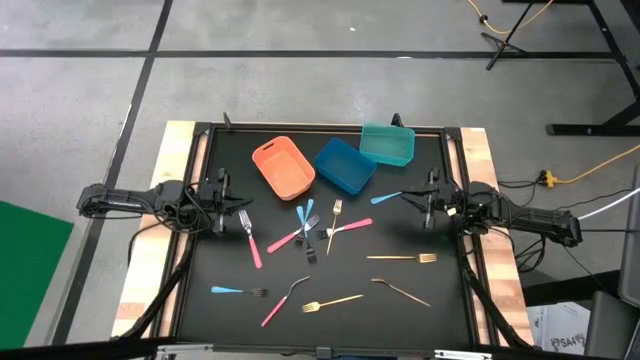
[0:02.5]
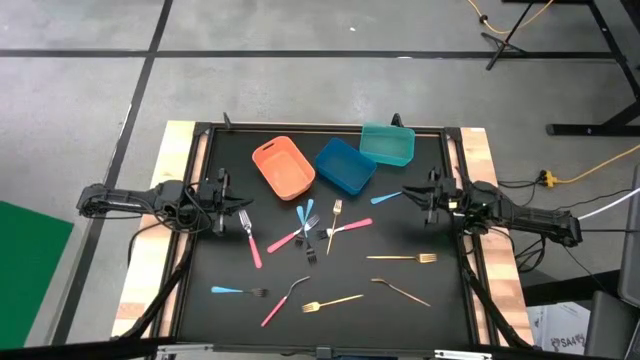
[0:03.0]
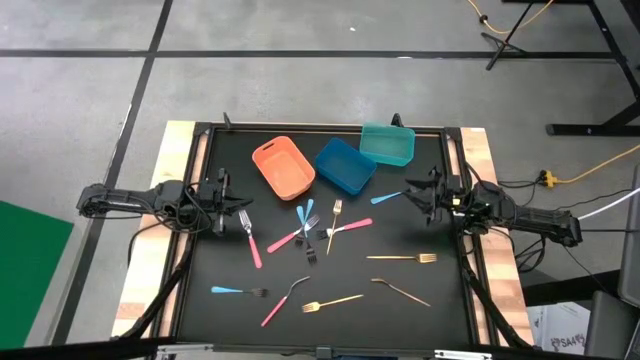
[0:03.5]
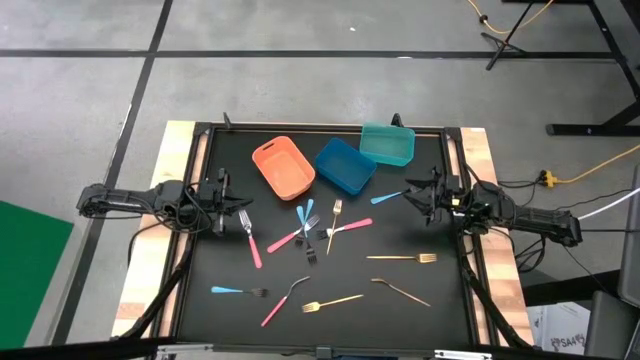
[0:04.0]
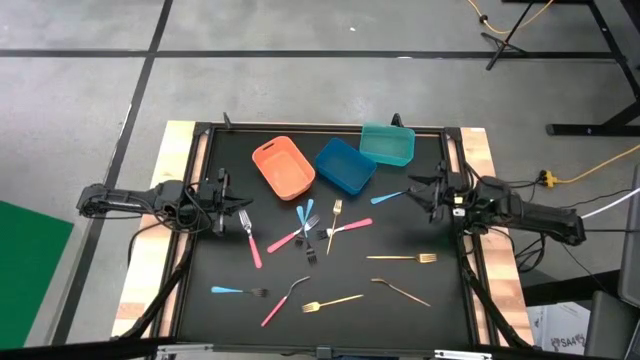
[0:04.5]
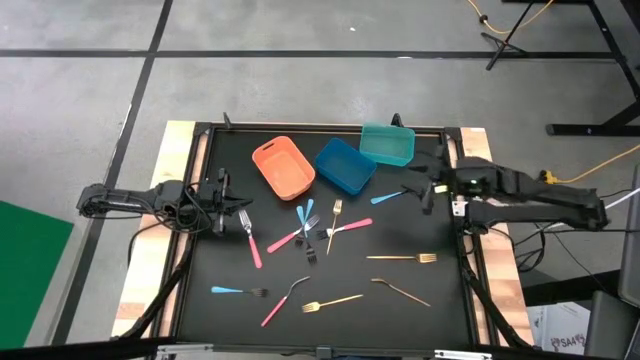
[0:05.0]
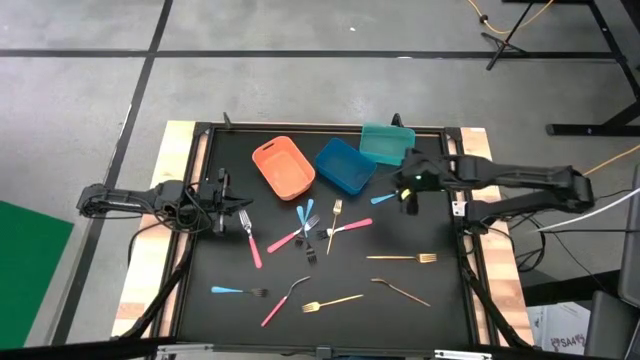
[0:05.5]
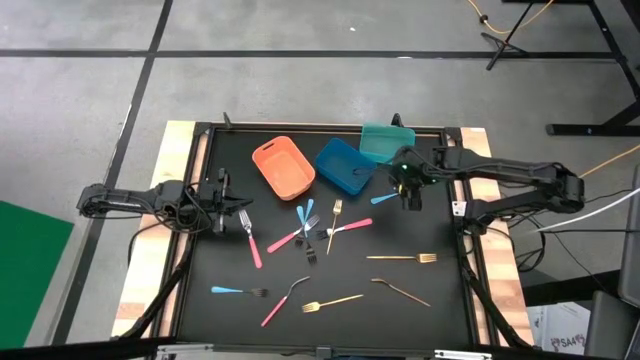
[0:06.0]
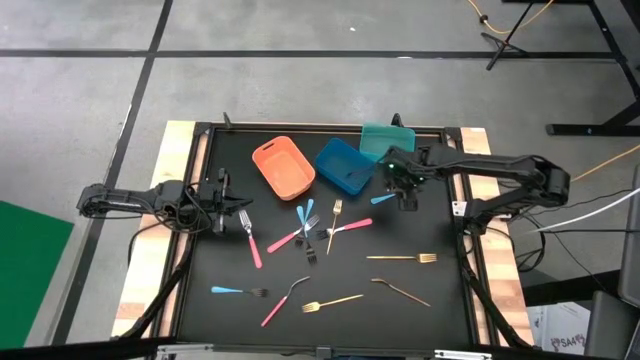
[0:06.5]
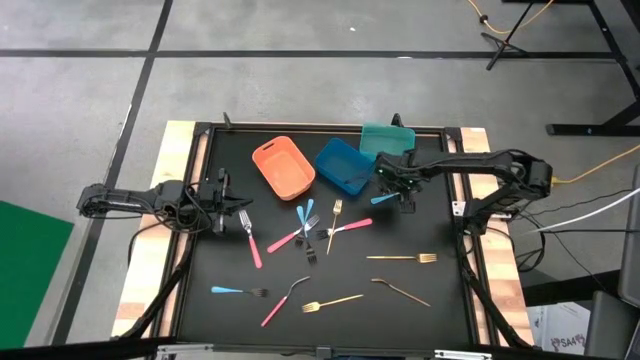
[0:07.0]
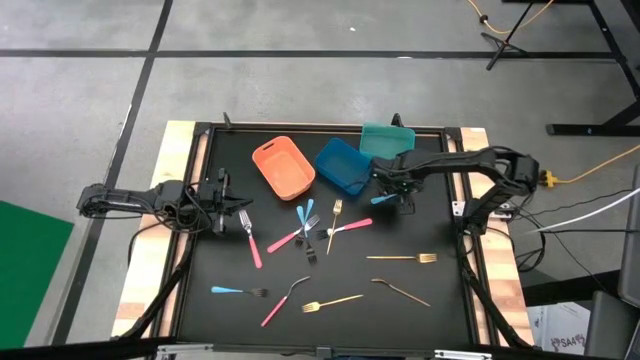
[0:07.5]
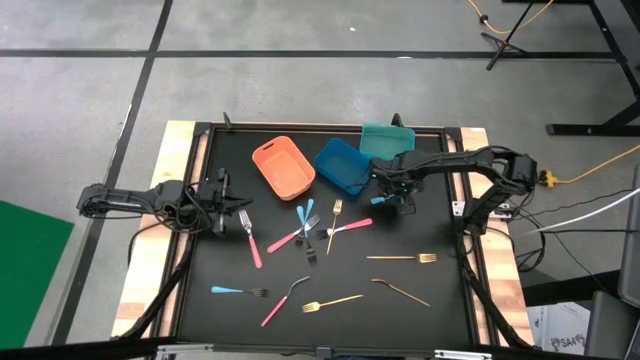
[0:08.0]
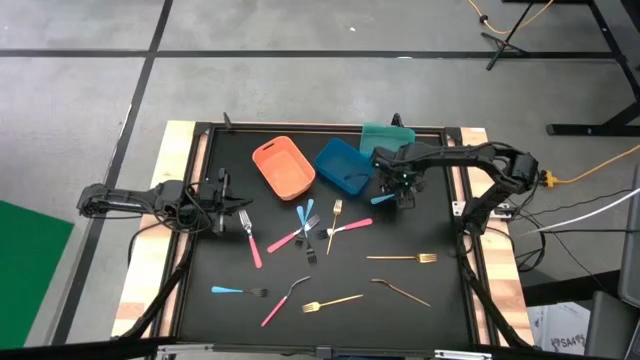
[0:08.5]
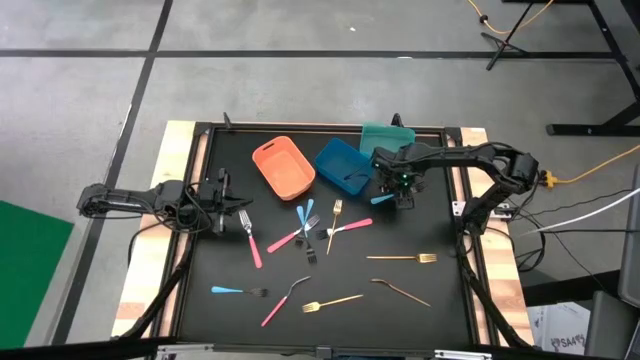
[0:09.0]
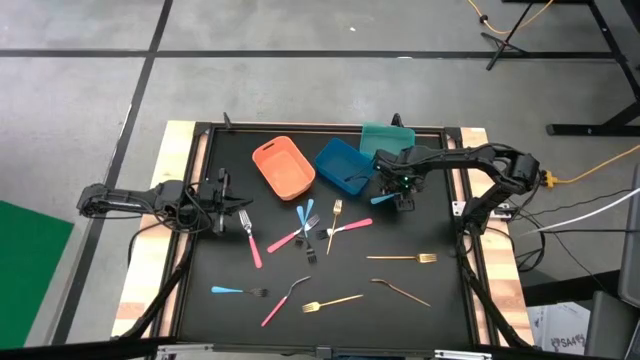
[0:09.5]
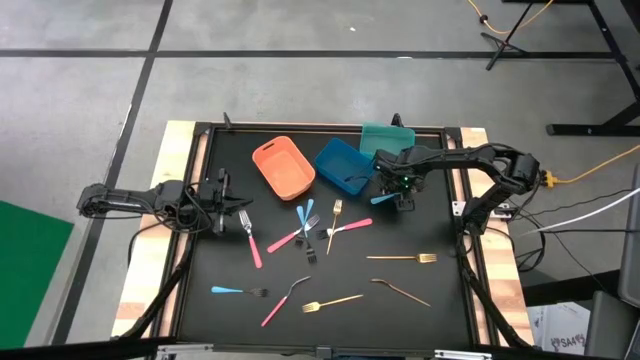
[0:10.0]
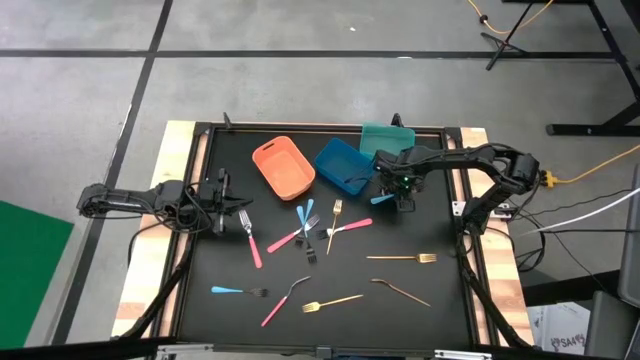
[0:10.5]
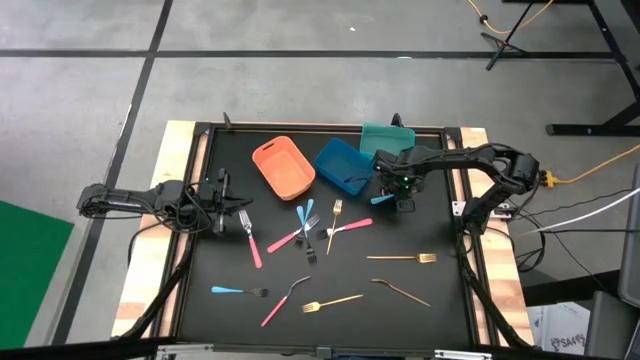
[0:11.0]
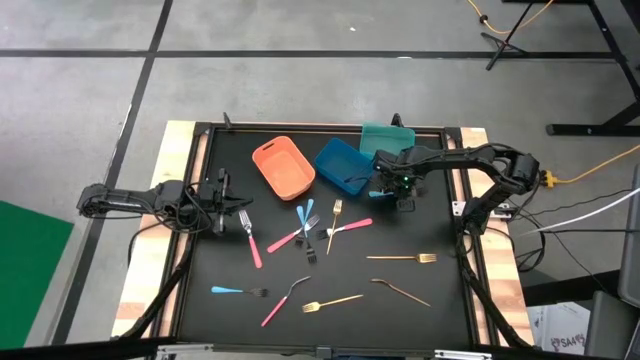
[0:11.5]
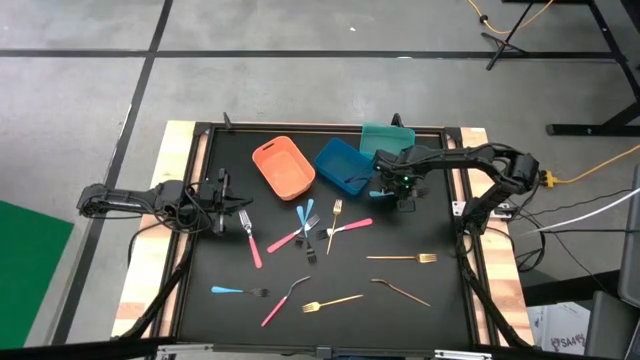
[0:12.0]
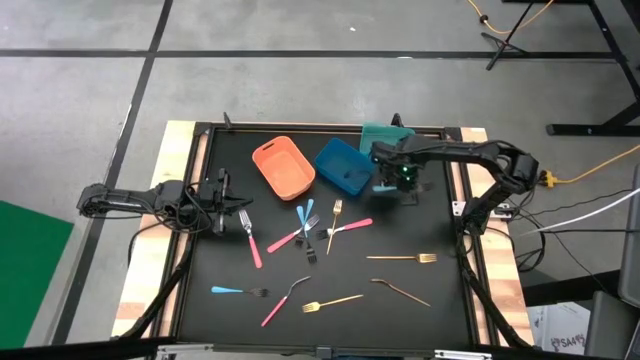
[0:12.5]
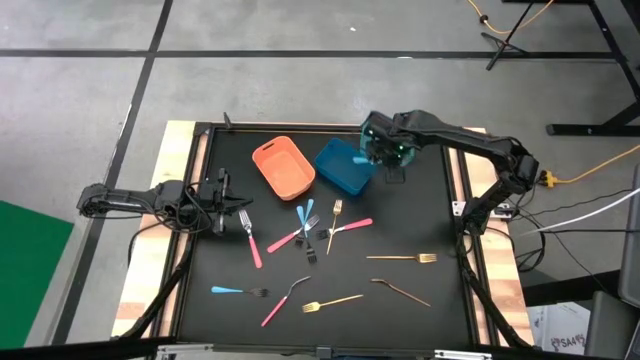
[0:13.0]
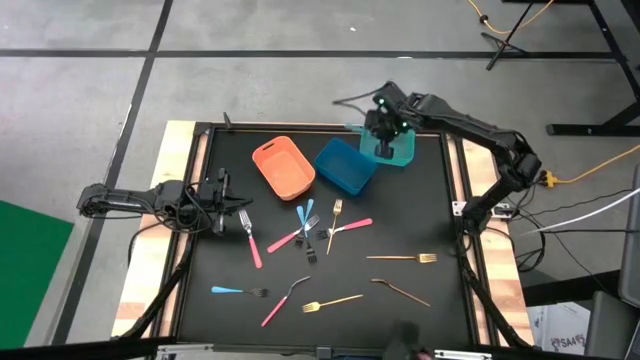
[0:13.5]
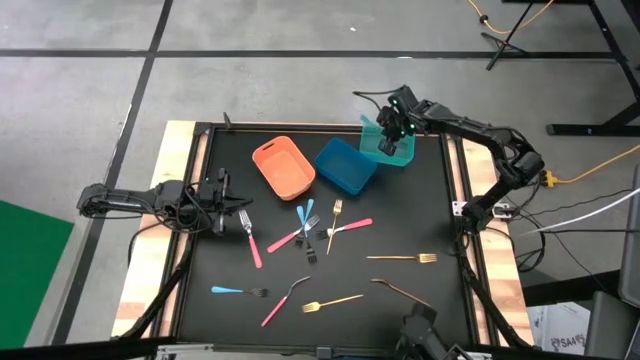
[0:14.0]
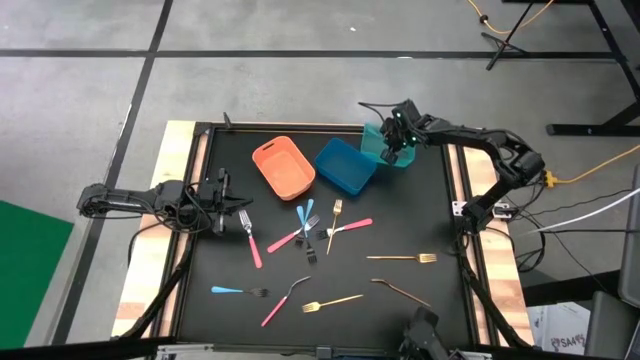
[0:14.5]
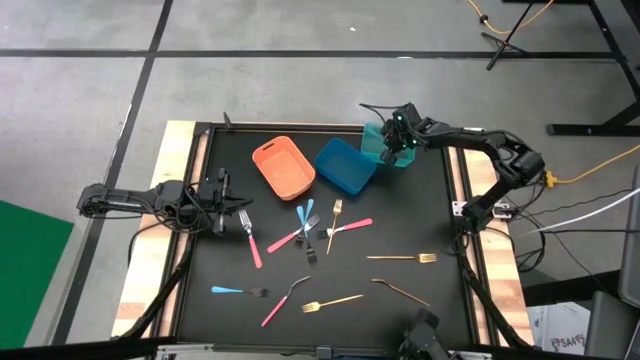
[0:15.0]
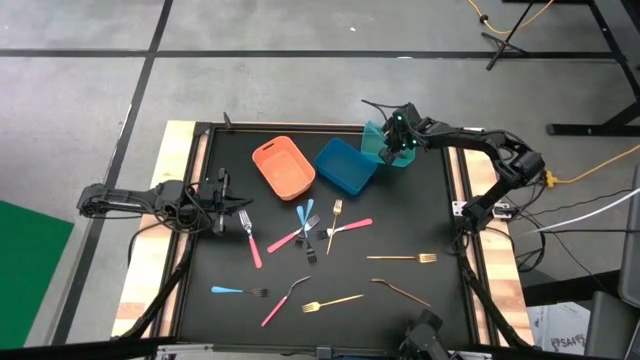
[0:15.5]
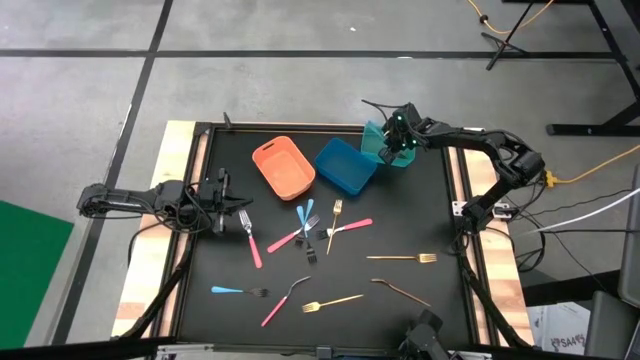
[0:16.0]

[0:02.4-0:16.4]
Task: Sort silverware by color (type)
Put the blue fork into the green bin

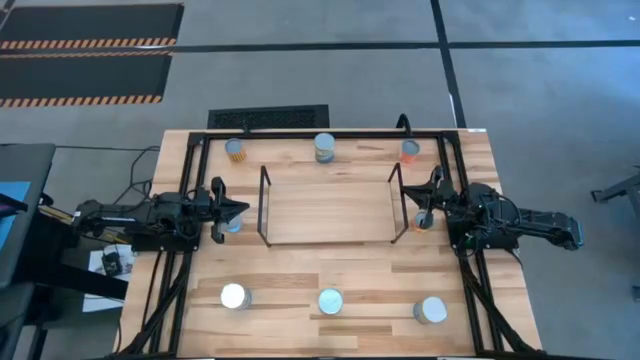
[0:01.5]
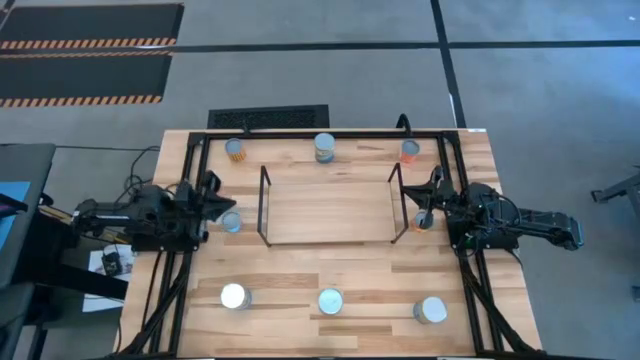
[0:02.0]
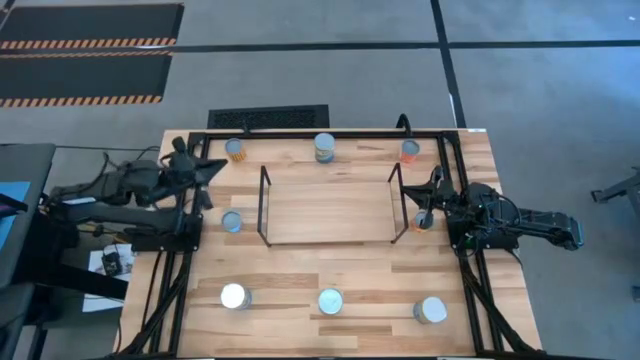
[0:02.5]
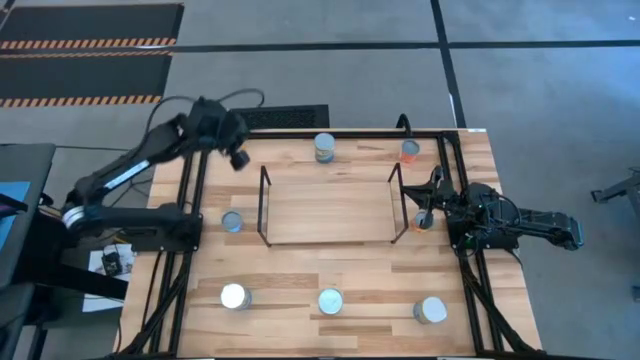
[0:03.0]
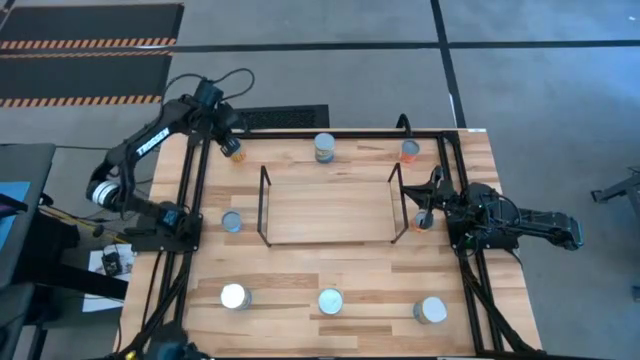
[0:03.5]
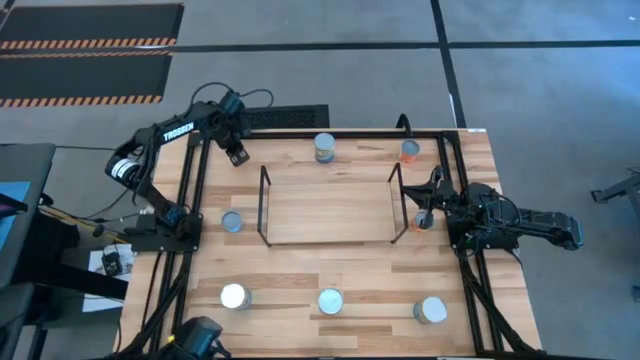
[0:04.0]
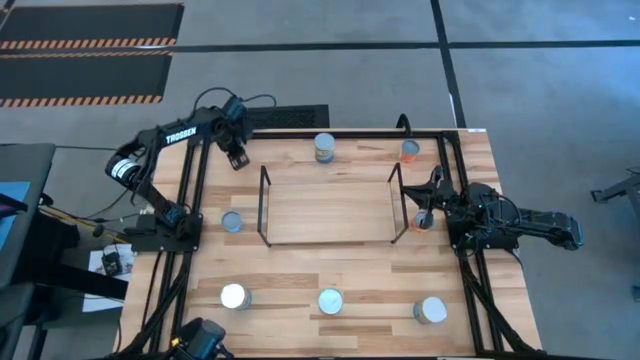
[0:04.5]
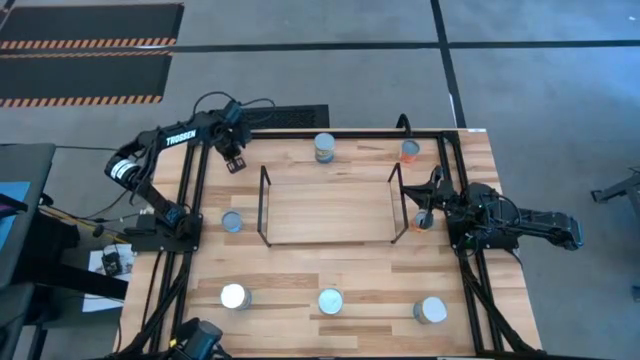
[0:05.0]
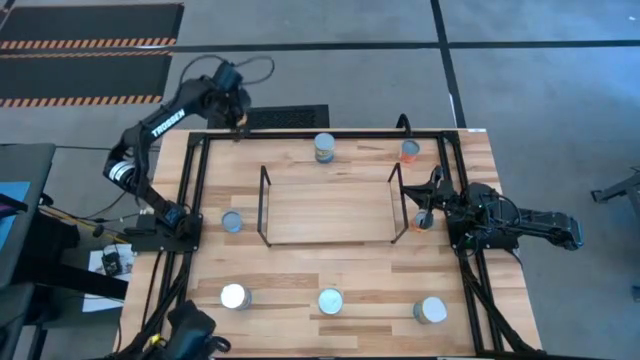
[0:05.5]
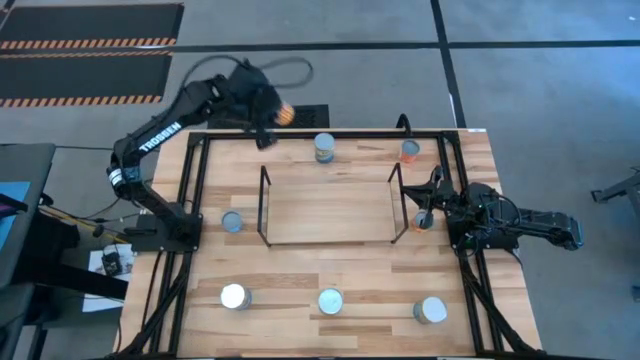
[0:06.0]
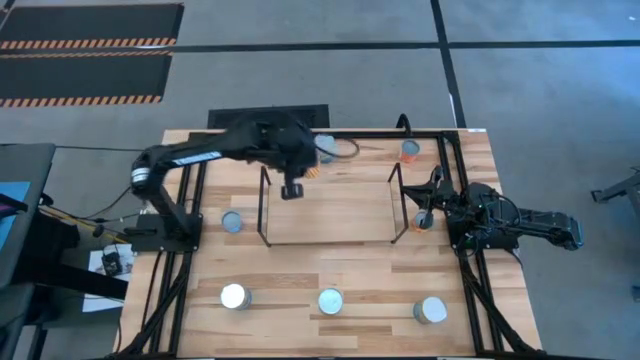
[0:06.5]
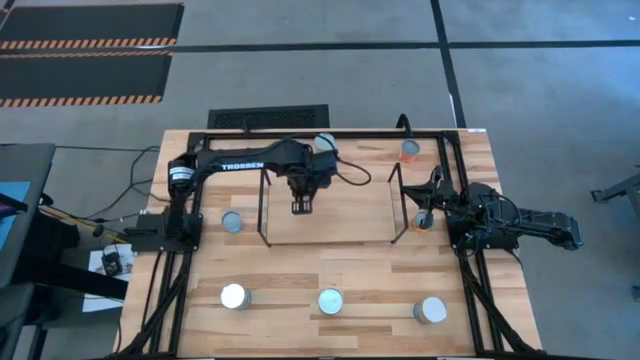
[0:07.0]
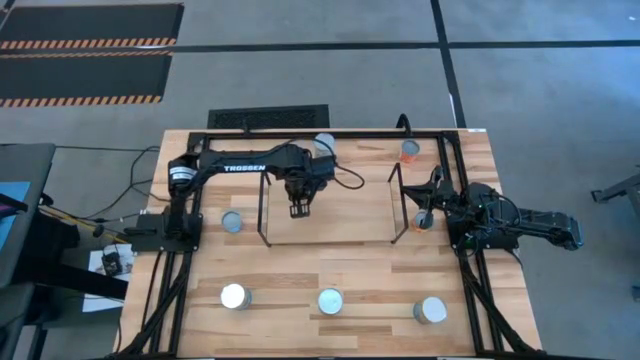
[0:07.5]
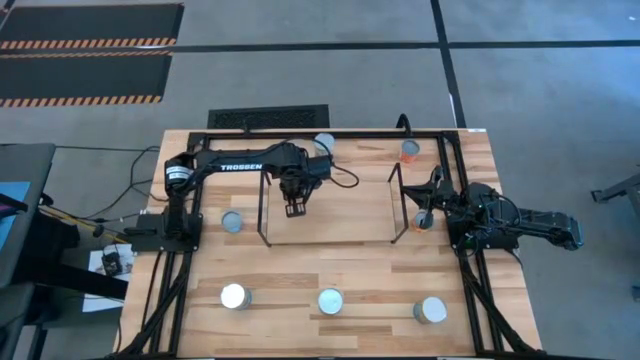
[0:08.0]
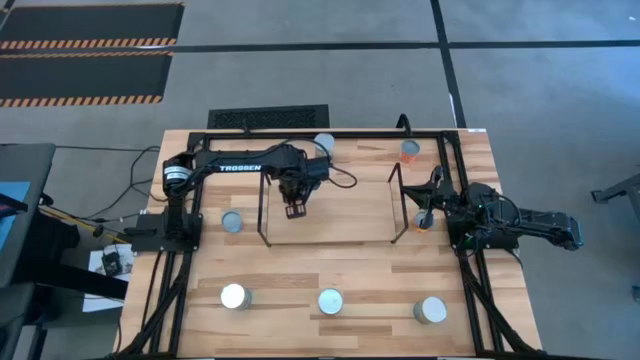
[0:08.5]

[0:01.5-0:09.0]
Task: Pick and place cans onto a shelf
Put the black beans can on the shelf
